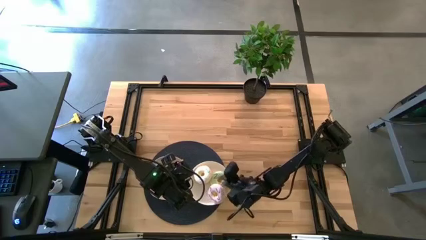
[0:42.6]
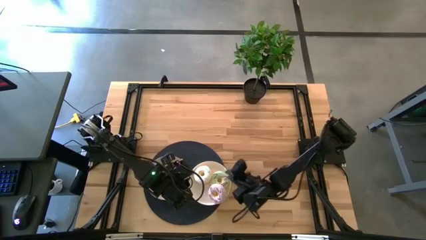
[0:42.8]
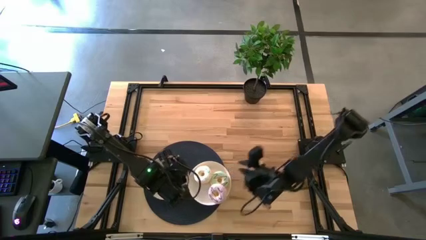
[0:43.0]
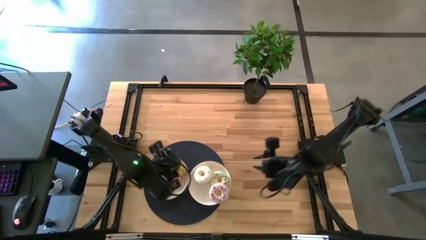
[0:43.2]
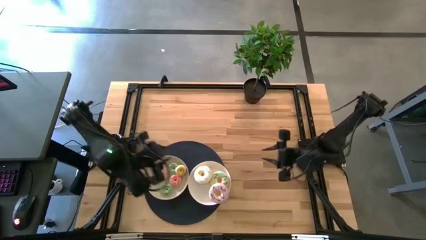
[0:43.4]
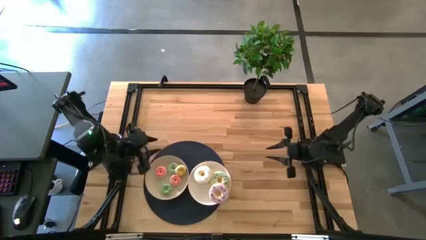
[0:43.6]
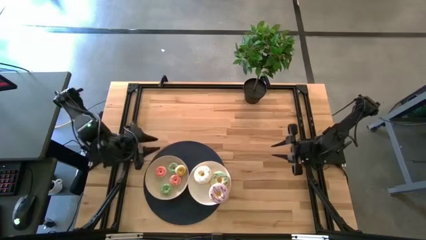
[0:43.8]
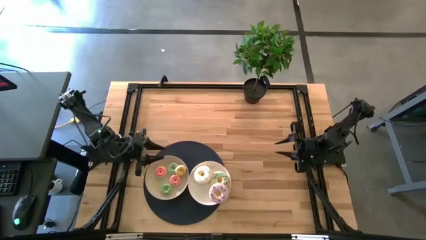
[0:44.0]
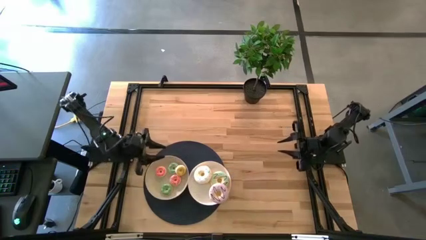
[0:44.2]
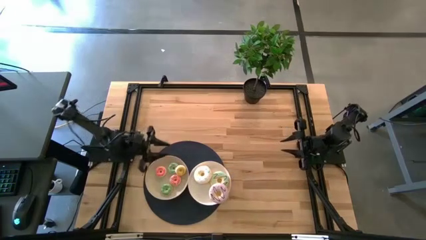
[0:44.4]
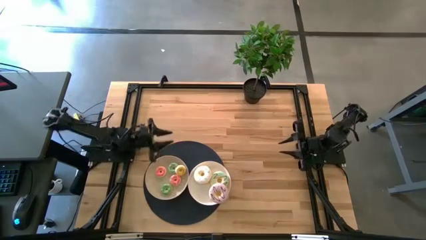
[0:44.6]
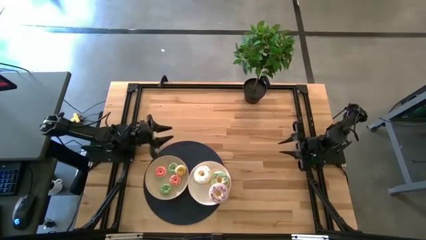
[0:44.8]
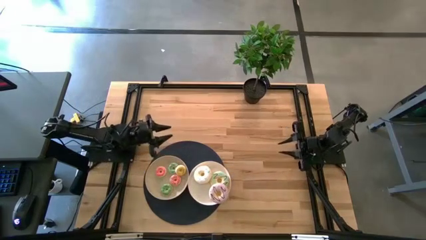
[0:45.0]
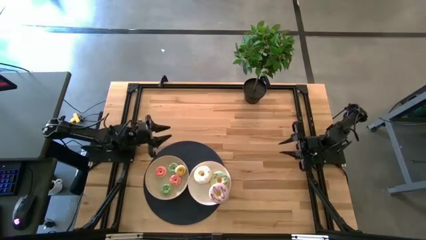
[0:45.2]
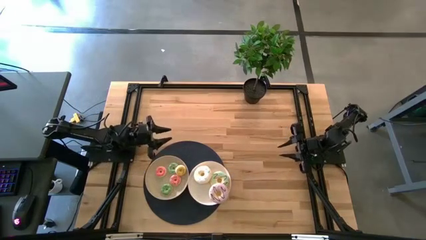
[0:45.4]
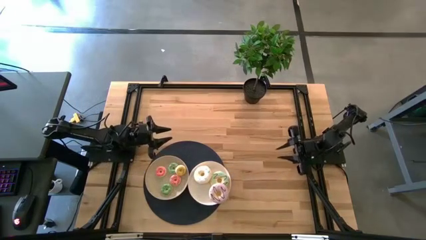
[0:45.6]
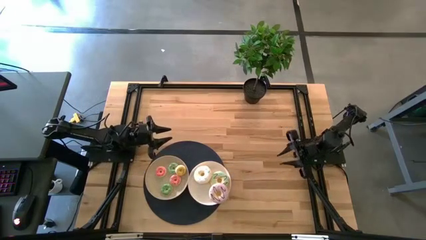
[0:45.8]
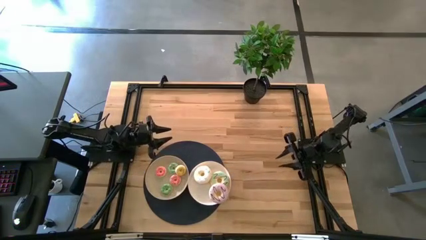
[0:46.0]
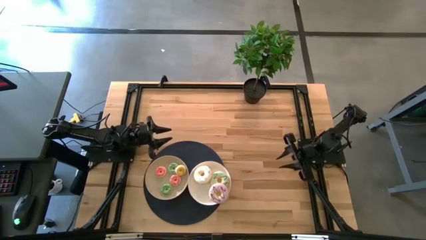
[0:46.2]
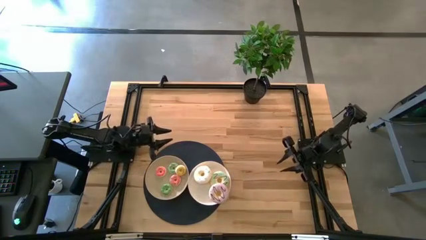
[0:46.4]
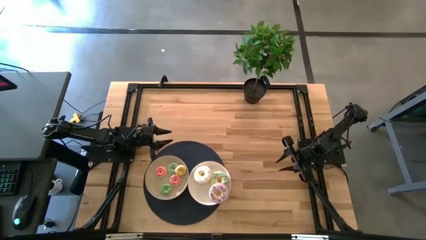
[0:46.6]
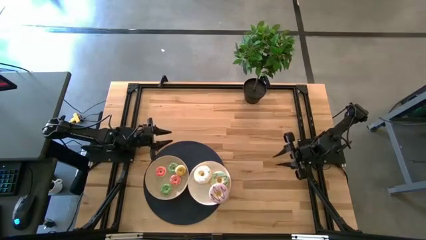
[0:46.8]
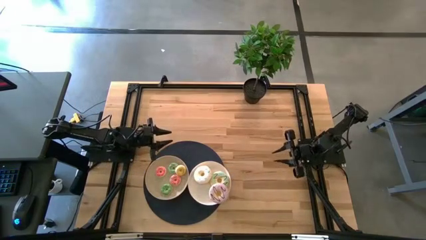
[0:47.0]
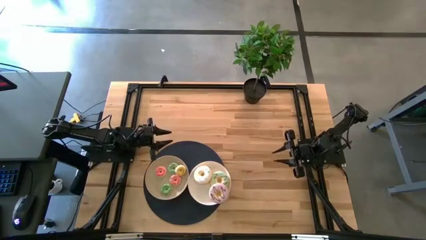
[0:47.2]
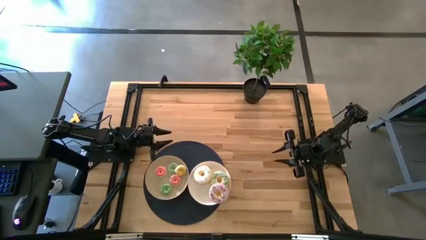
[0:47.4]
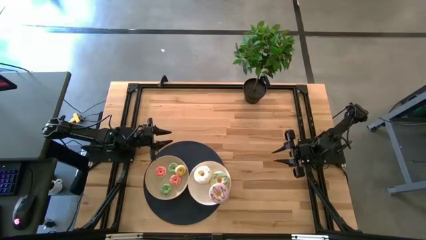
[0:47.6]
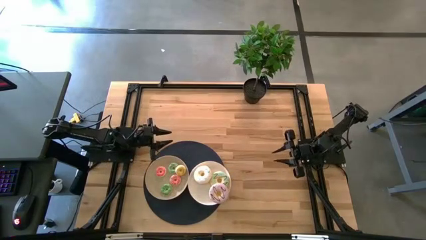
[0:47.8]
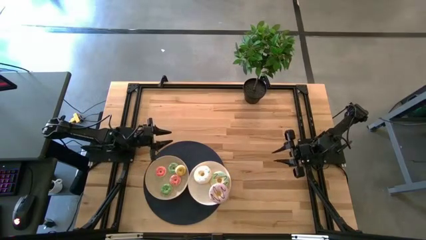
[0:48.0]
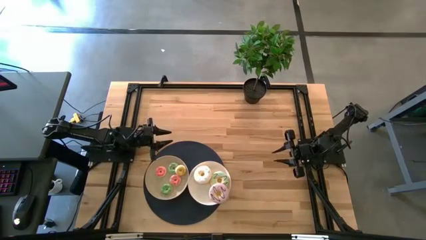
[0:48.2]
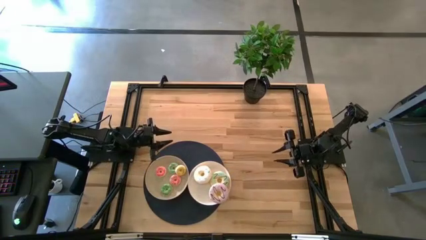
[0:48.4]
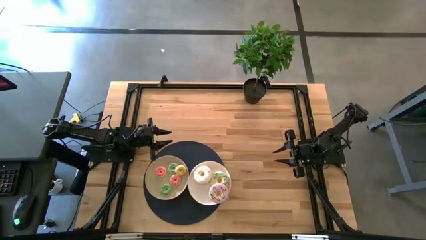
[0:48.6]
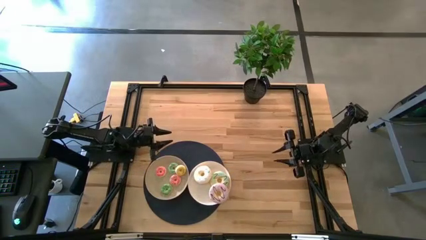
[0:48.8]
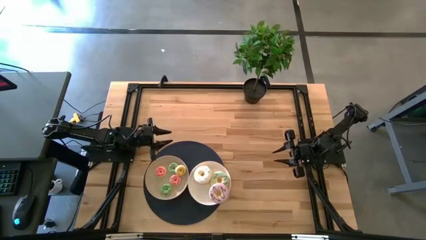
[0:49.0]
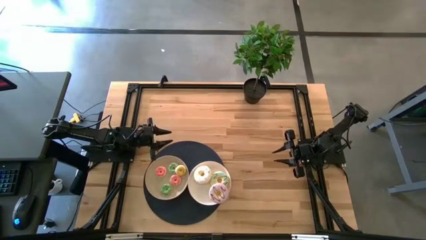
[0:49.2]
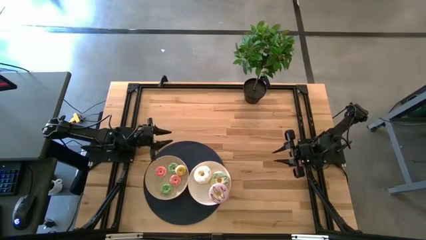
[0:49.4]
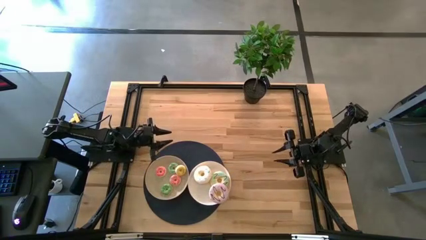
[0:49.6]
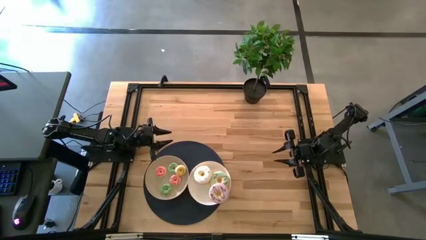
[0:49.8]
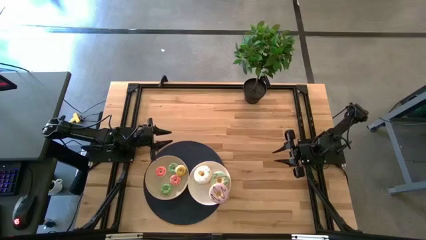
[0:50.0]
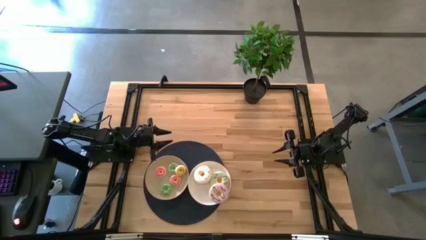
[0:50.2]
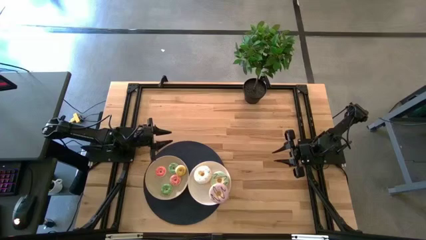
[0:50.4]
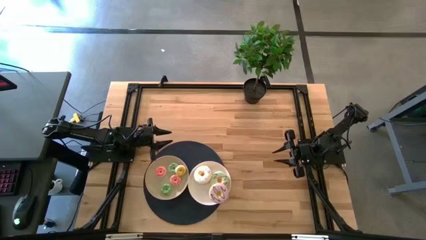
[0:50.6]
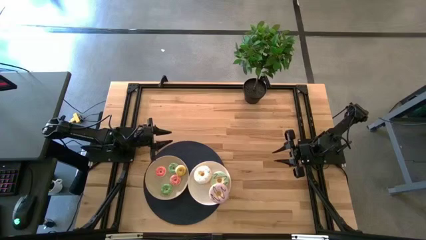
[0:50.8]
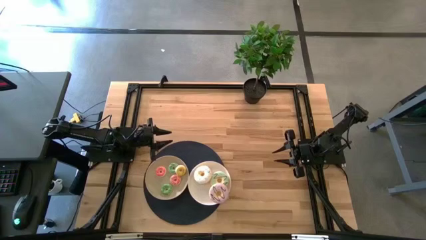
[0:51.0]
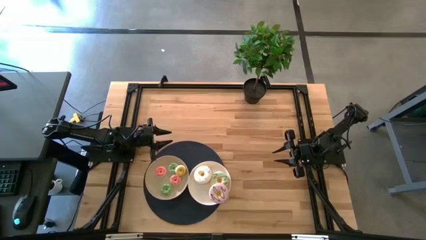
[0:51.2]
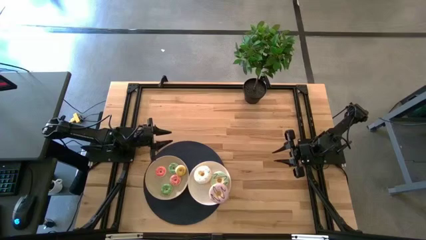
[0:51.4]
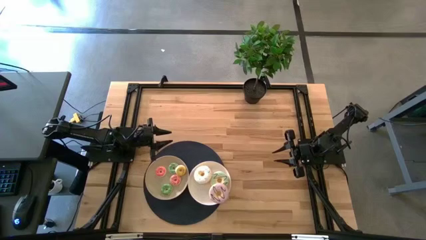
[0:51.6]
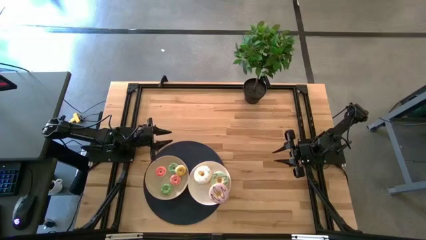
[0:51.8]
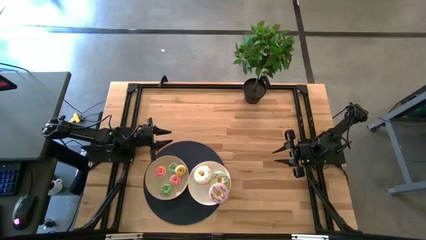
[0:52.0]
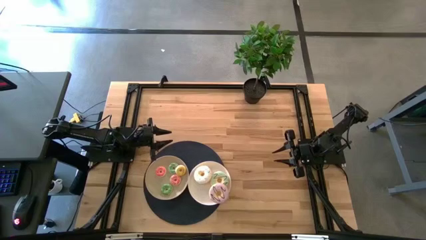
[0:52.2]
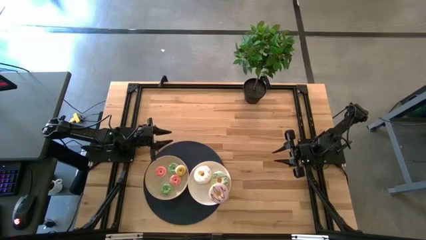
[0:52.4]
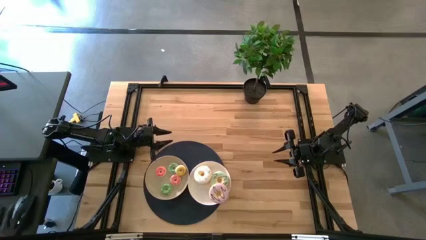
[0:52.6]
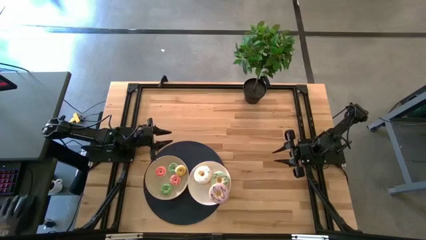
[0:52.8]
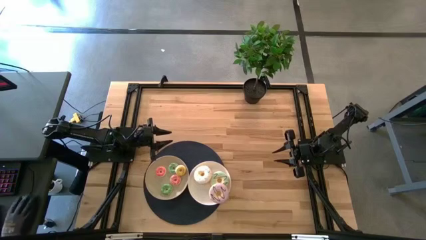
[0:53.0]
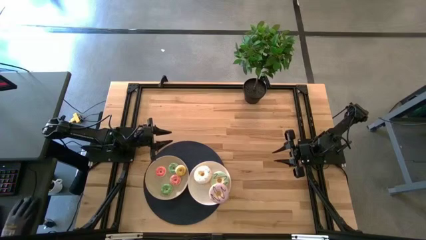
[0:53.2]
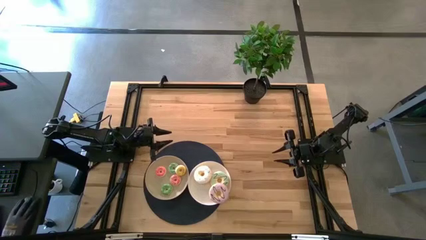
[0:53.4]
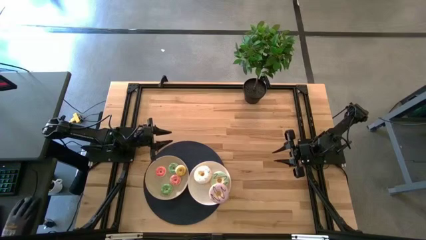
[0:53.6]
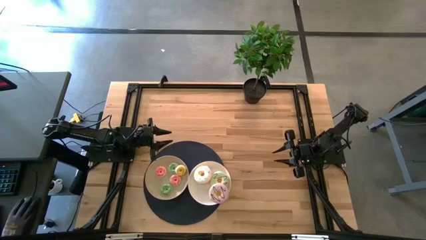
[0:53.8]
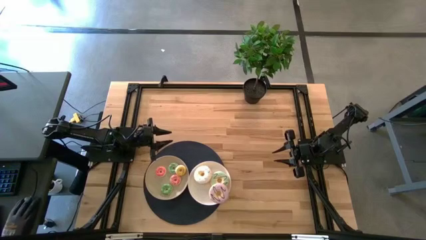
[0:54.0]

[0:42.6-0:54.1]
Task: Pick & Place donuts
Return to Home Position
